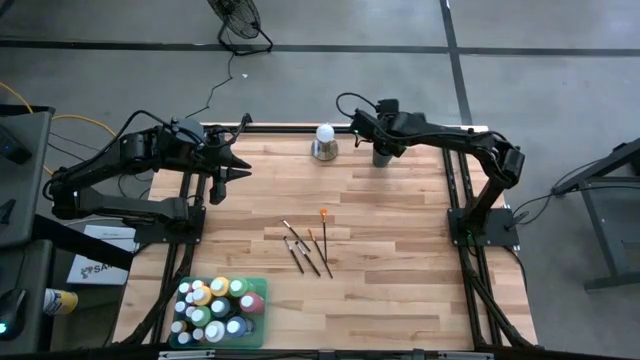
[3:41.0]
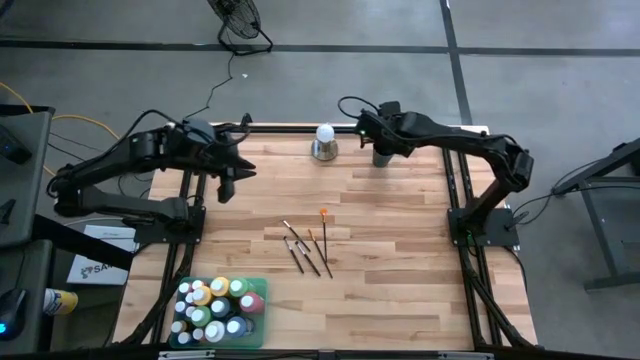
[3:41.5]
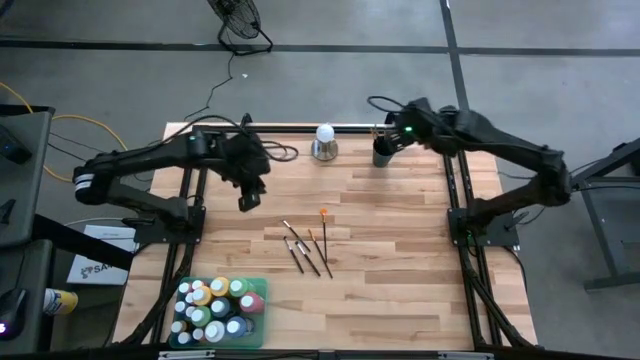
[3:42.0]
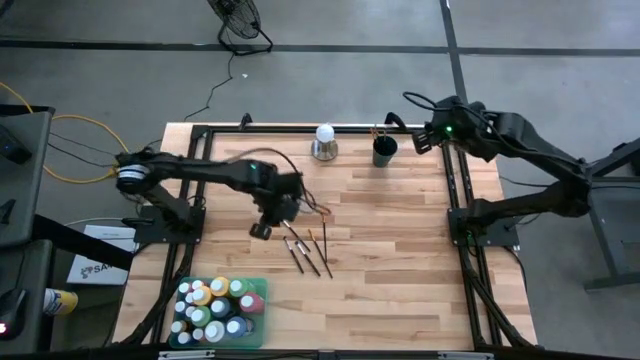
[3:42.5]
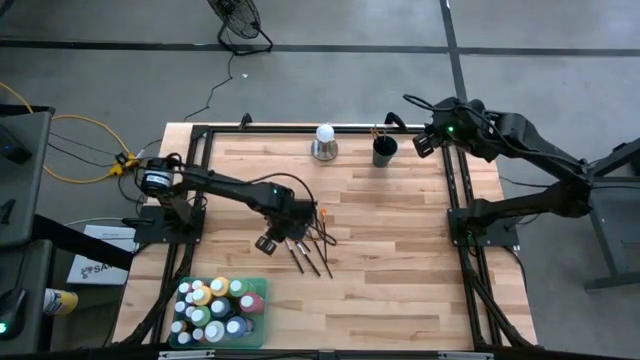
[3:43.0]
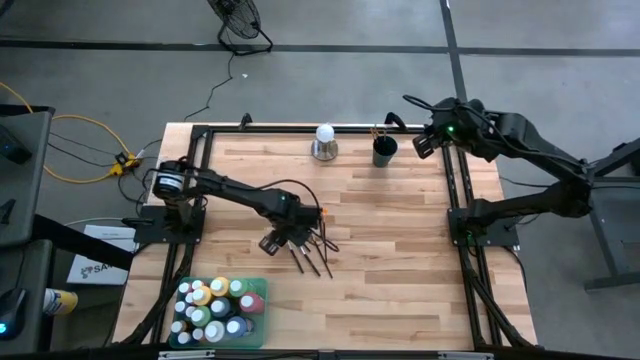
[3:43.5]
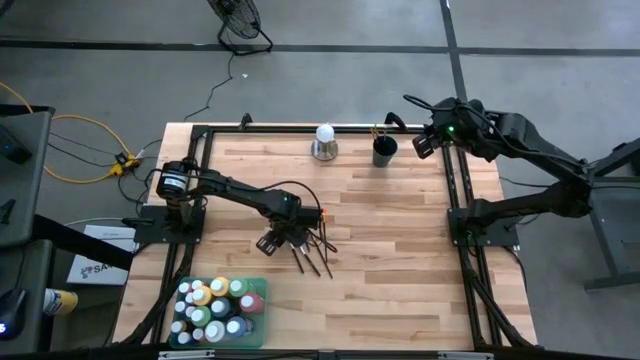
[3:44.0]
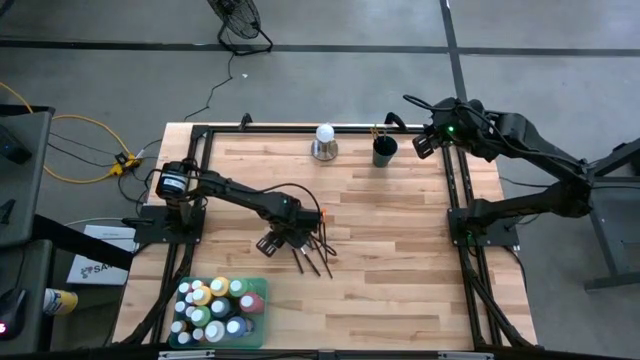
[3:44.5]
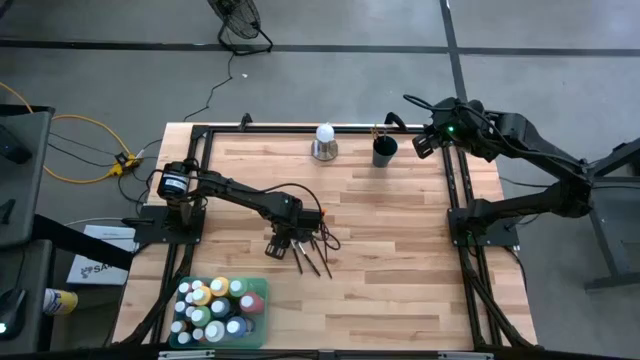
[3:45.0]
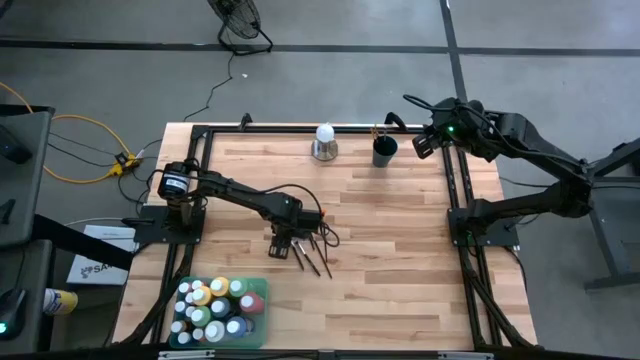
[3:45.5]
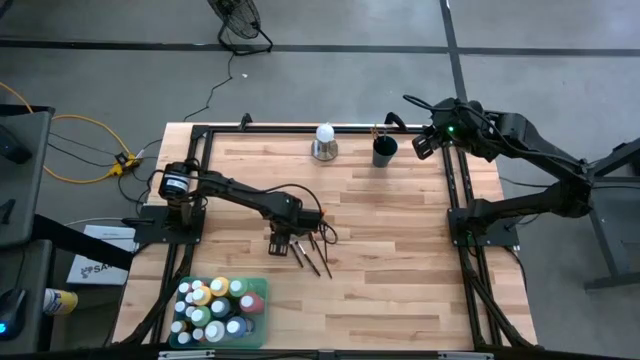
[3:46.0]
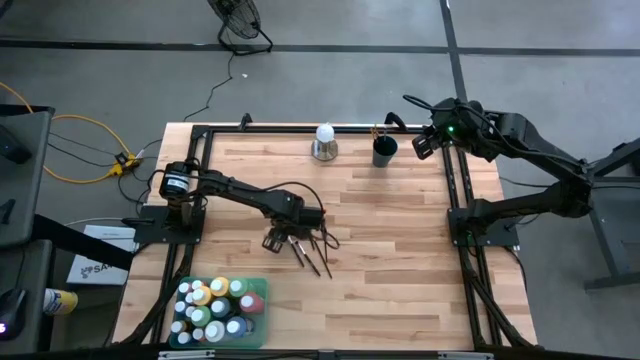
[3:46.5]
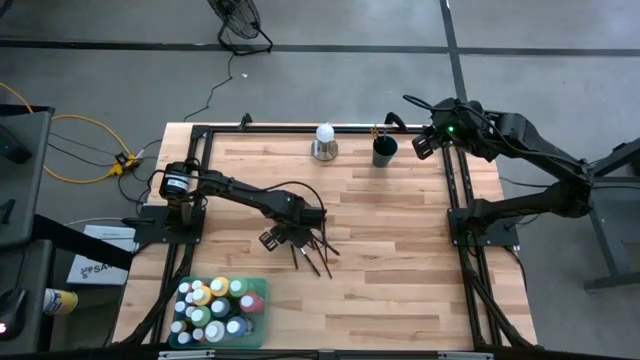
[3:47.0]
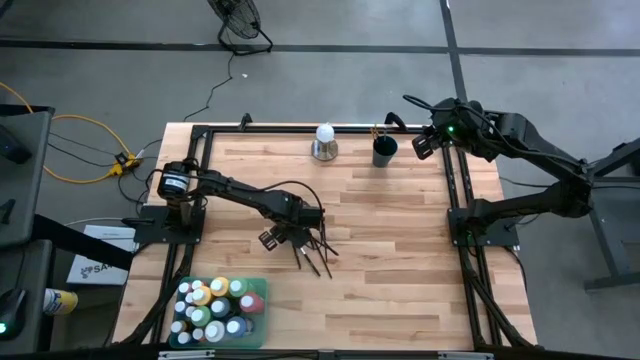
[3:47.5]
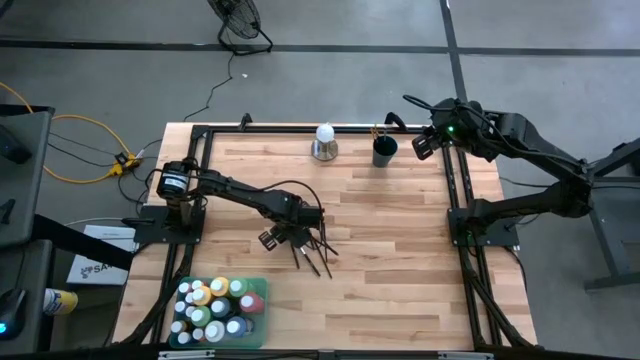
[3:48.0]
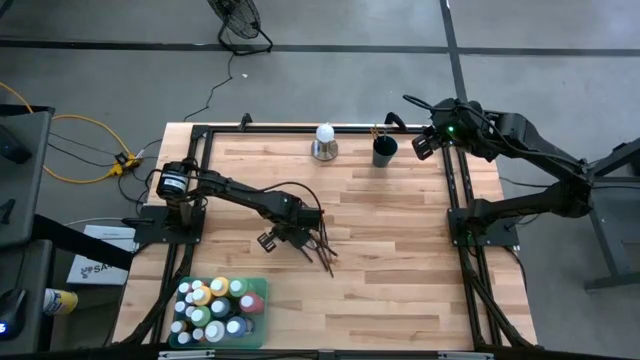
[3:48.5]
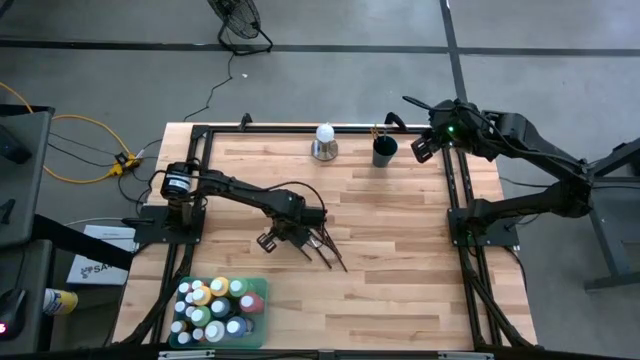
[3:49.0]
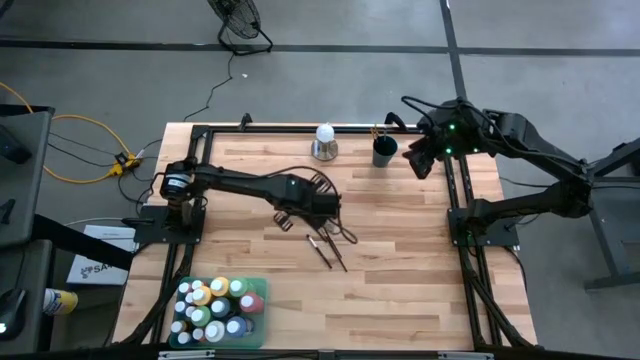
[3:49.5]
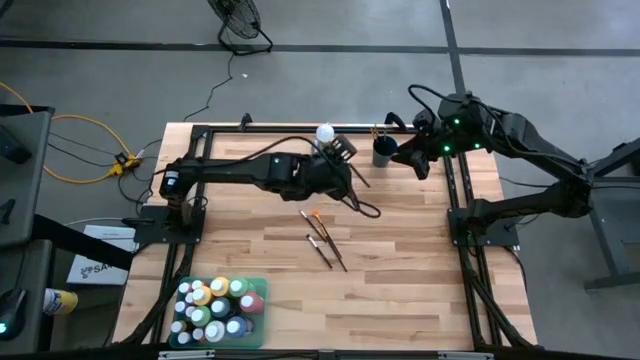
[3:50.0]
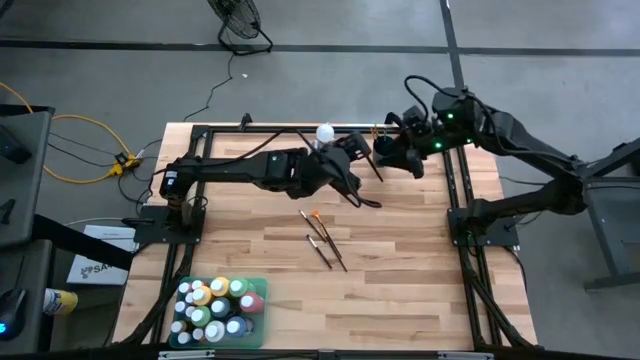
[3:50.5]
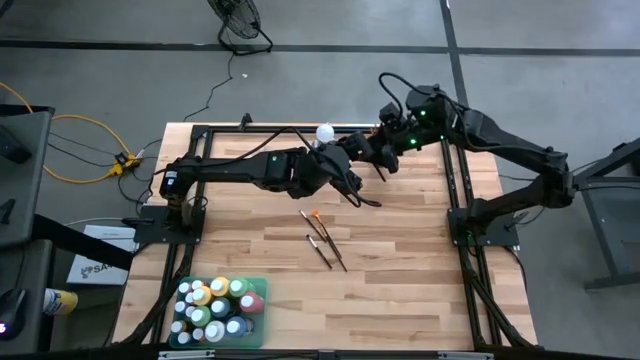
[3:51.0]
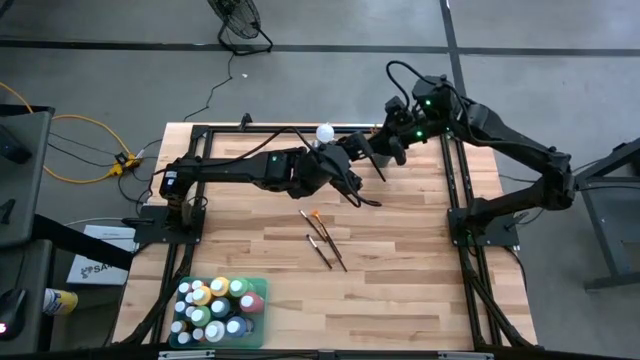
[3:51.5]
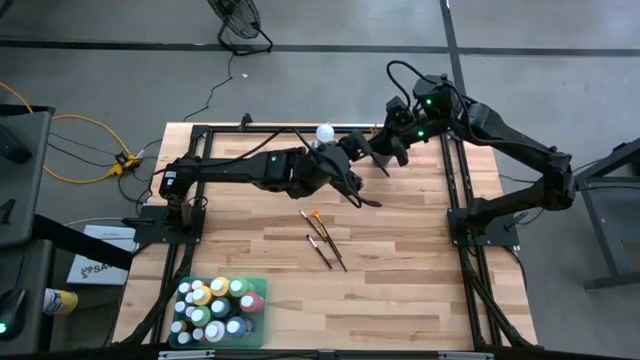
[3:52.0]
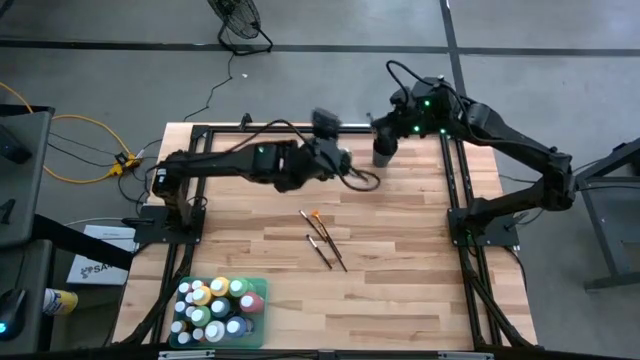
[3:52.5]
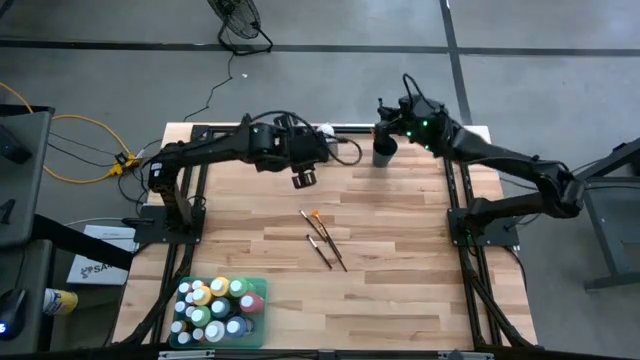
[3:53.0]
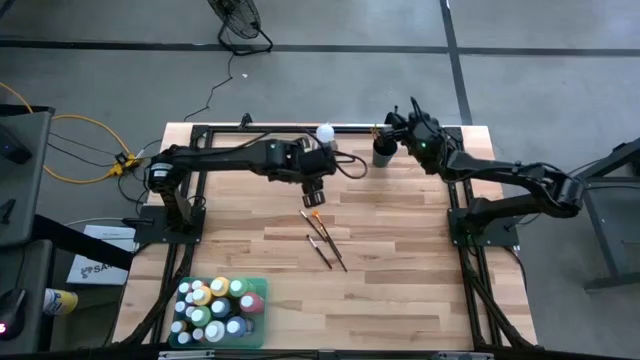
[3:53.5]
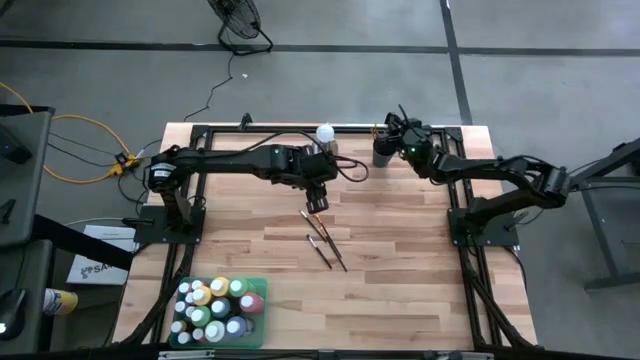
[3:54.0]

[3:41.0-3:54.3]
Task: Pick & Place Paint Supplies
Put the silver paint brush into the black cup

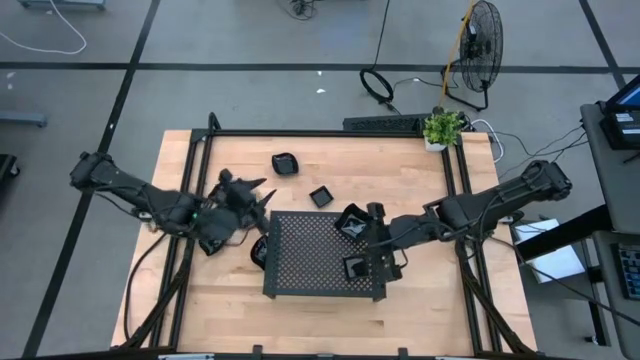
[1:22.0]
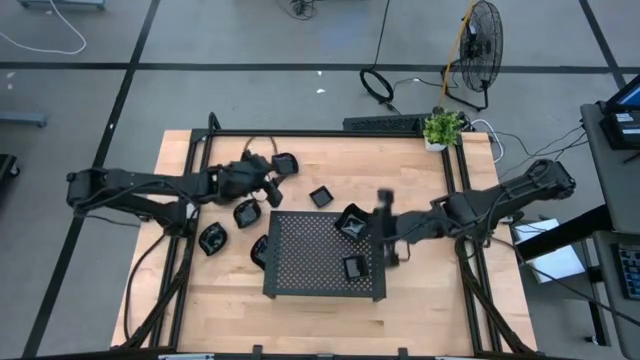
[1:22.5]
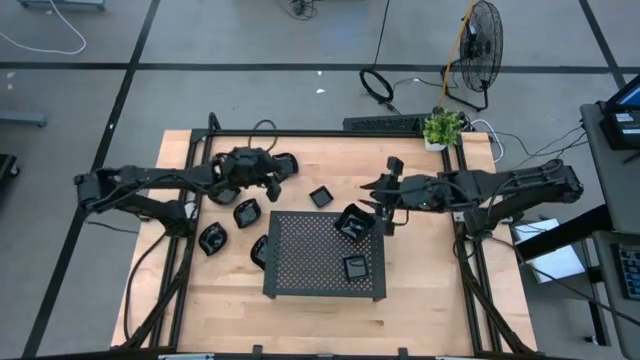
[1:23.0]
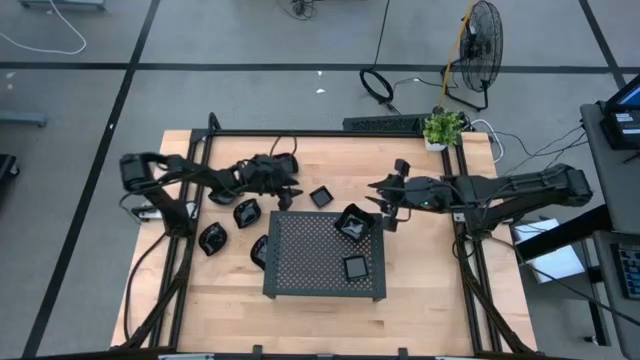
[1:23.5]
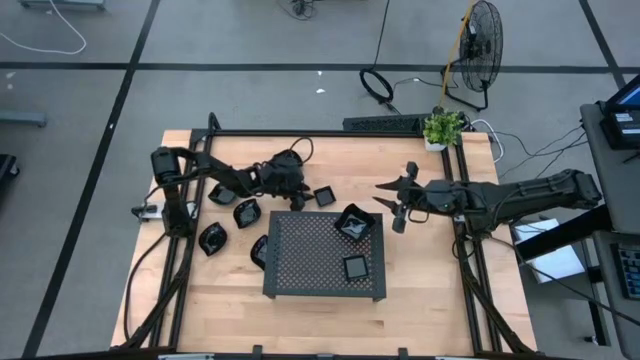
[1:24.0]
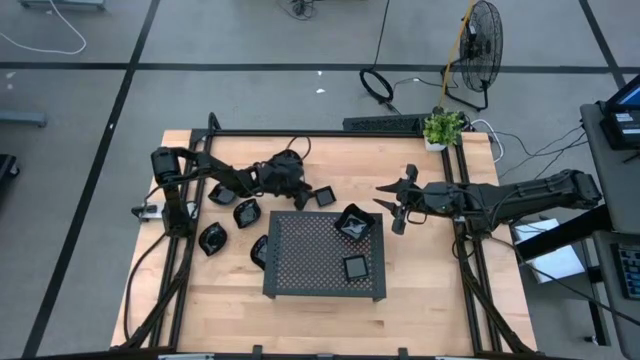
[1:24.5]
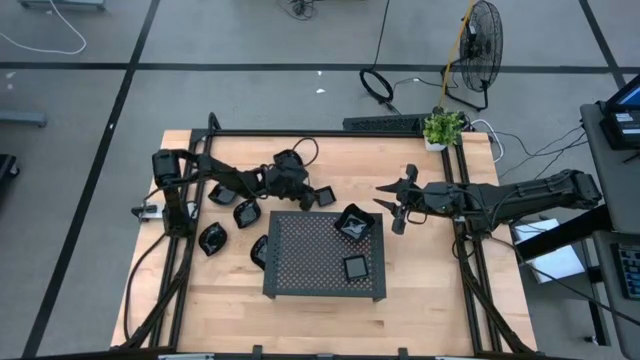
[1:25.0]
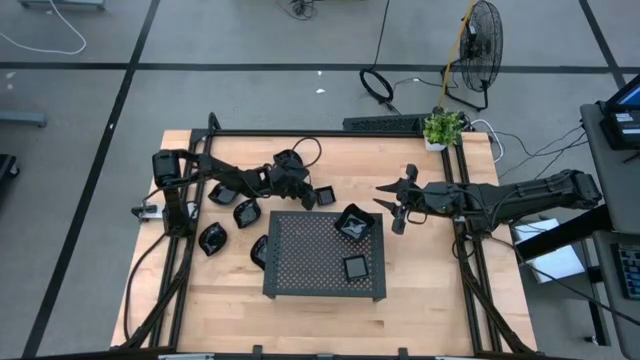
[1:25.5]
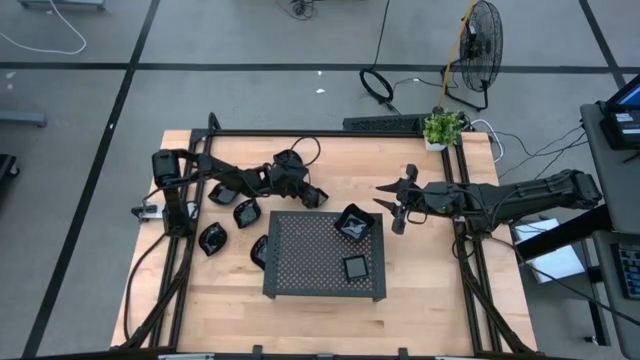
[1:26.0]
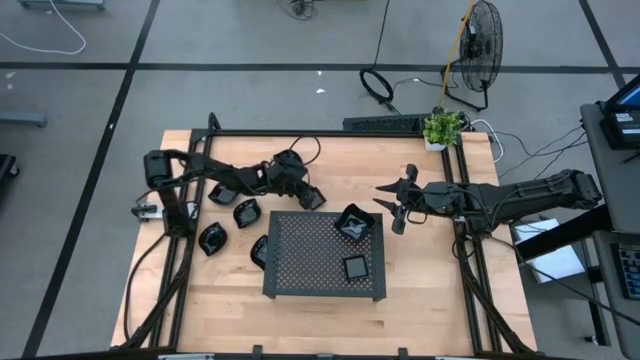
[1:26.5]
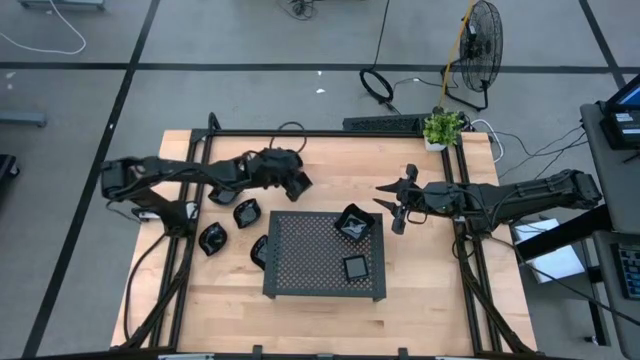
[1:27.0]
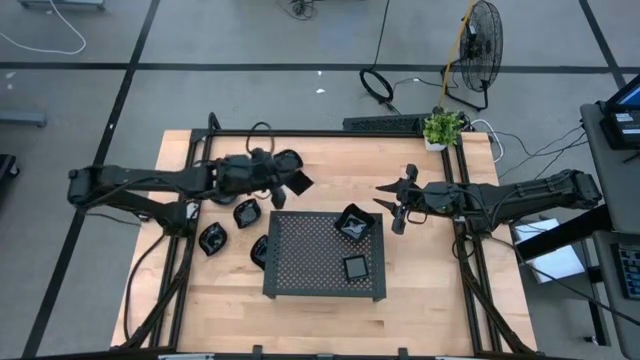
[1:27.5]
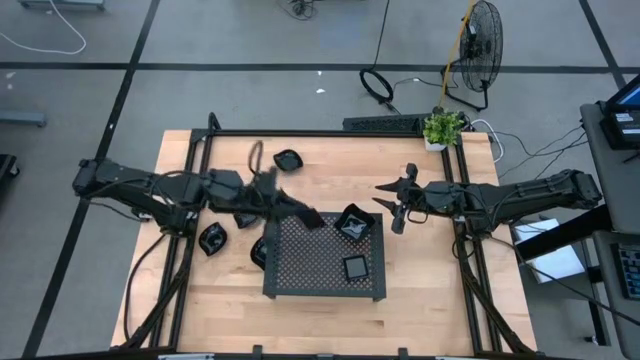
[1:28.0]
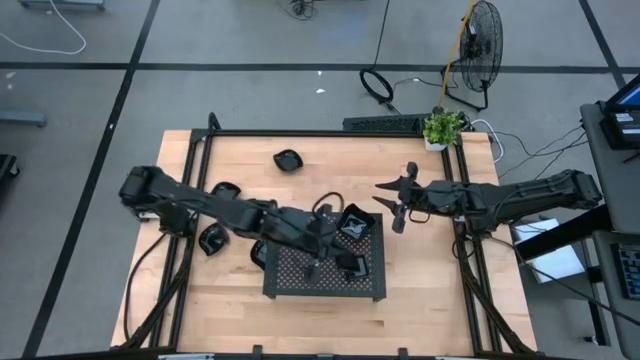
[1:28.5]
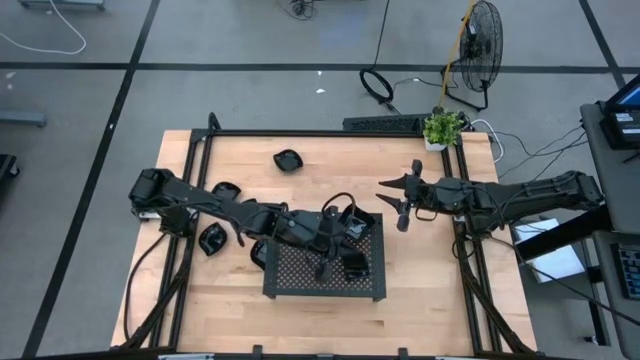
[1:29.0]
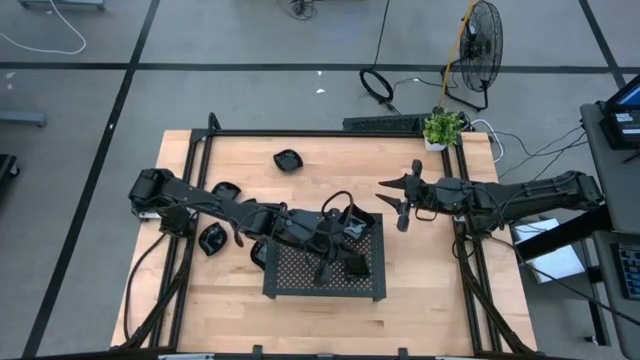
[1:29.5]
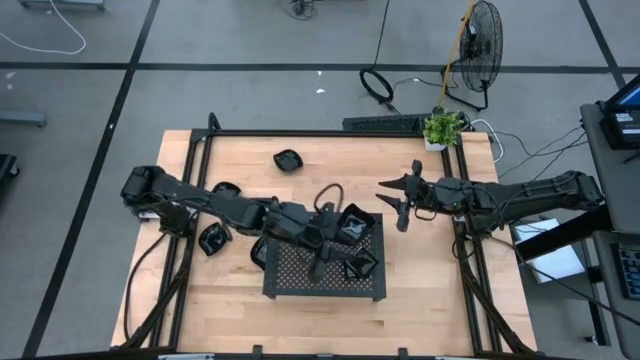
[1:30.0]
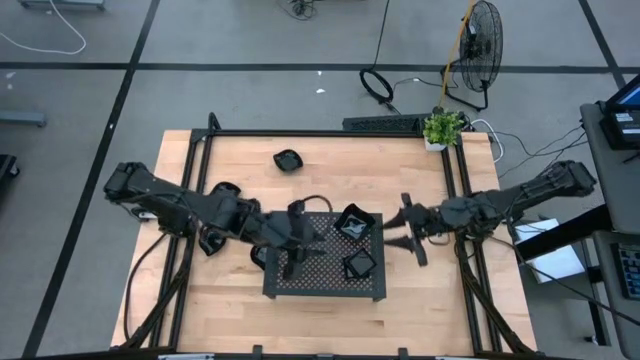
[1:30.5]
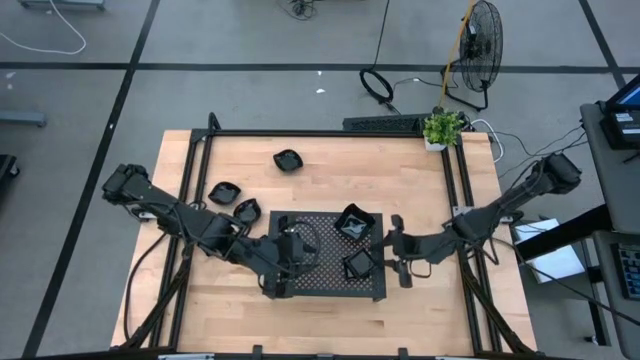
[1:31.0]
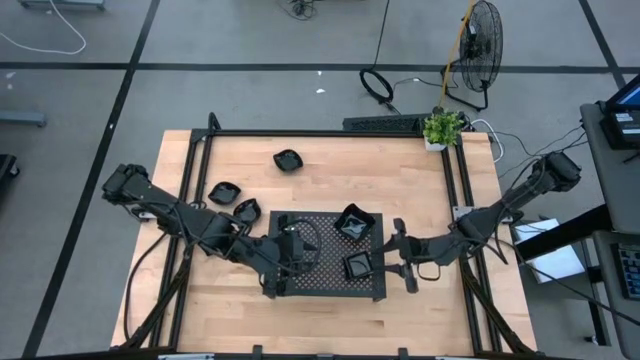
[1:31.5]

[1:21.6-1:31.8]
Task: Pick & Place Mini shaped plates
Stack the black square plate on top of the black square plates on the shelf
